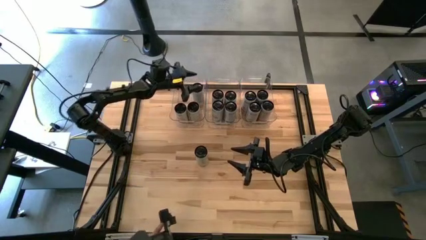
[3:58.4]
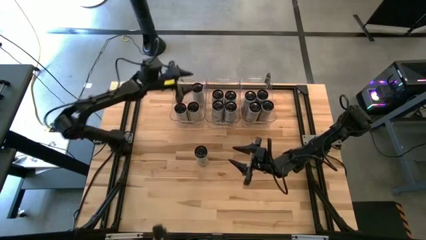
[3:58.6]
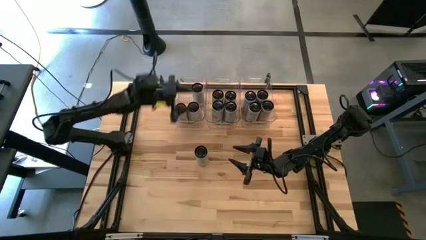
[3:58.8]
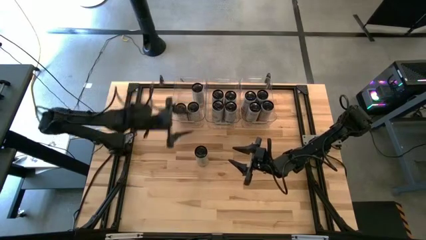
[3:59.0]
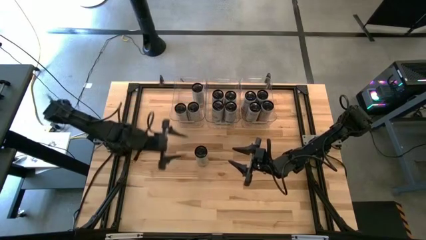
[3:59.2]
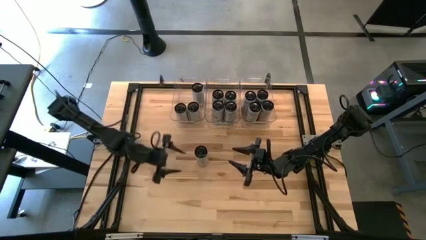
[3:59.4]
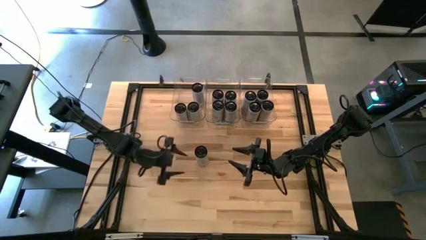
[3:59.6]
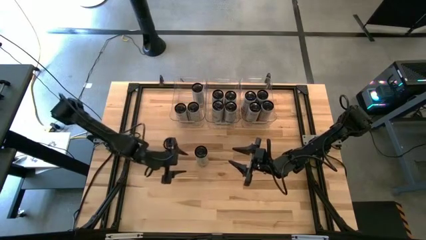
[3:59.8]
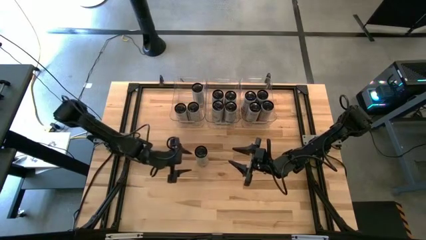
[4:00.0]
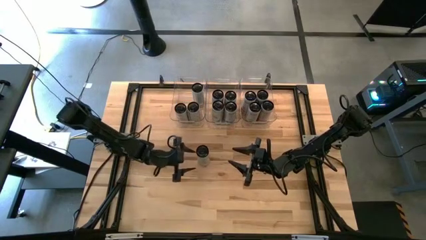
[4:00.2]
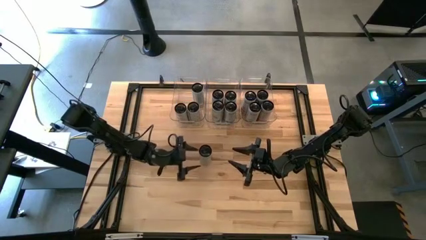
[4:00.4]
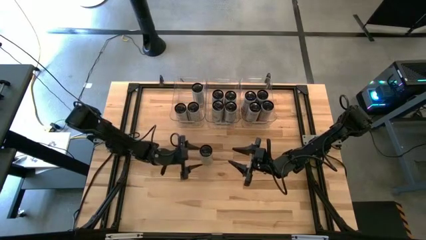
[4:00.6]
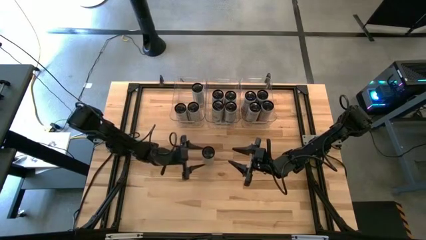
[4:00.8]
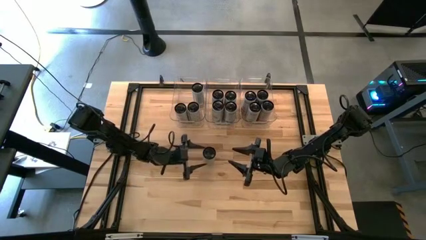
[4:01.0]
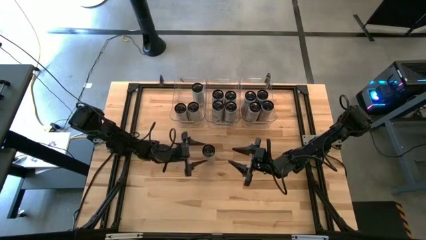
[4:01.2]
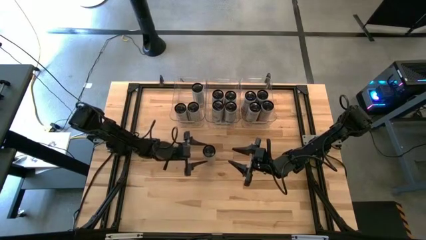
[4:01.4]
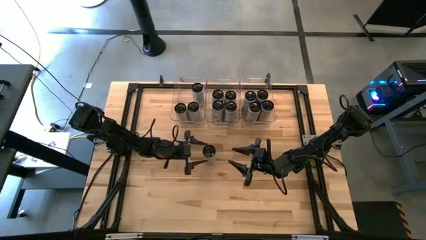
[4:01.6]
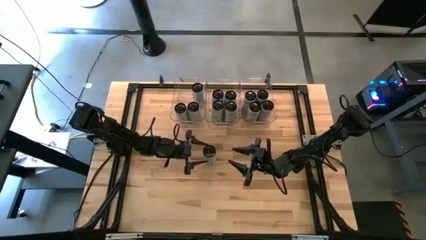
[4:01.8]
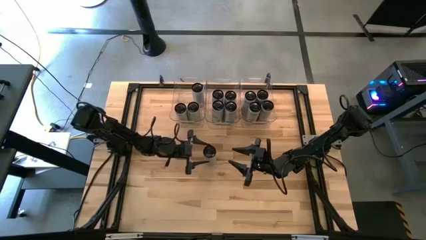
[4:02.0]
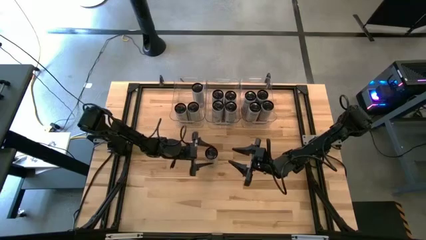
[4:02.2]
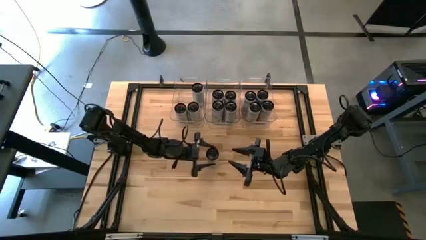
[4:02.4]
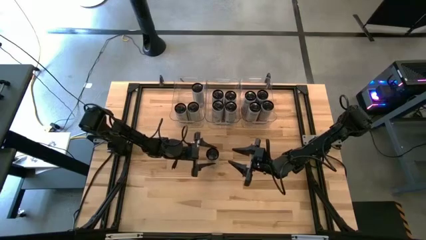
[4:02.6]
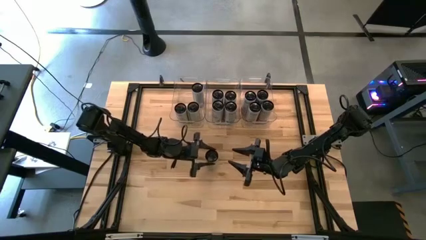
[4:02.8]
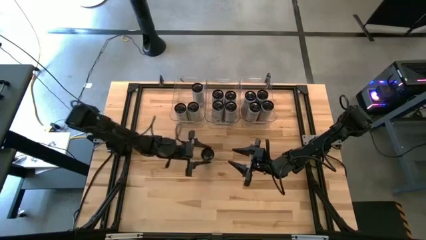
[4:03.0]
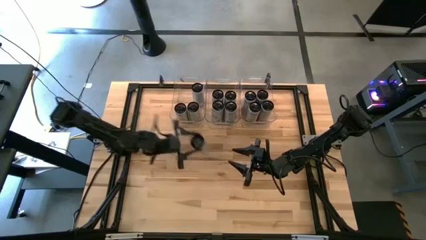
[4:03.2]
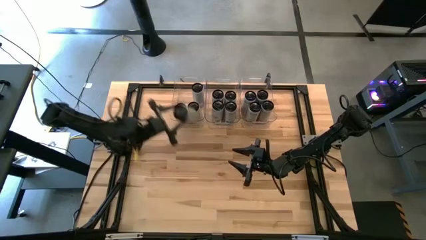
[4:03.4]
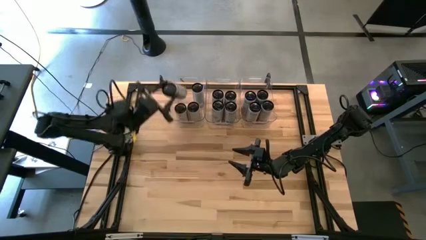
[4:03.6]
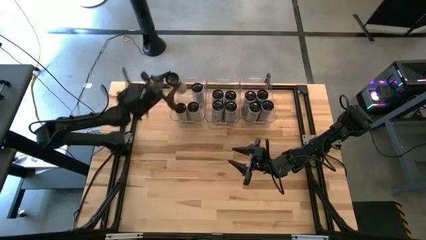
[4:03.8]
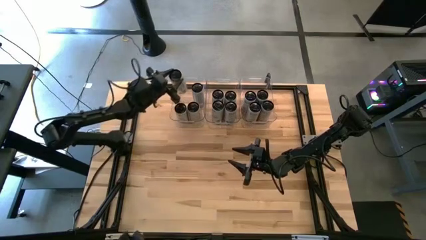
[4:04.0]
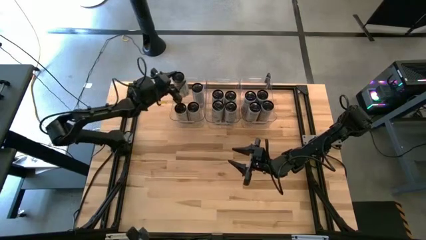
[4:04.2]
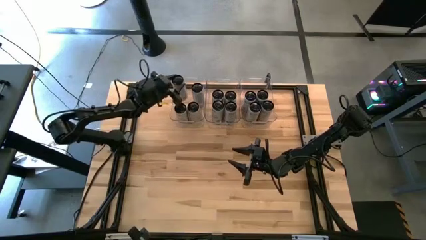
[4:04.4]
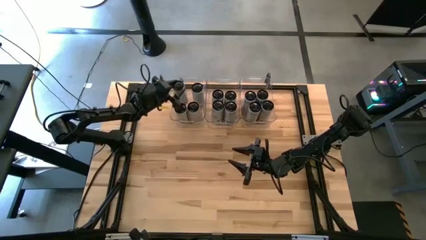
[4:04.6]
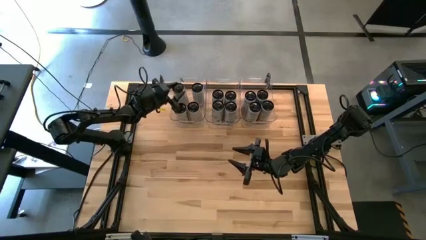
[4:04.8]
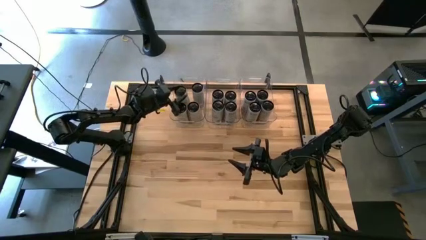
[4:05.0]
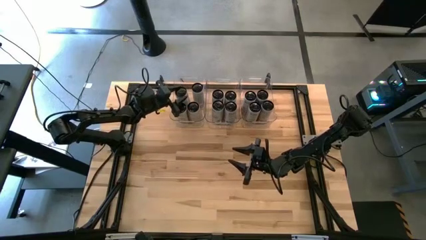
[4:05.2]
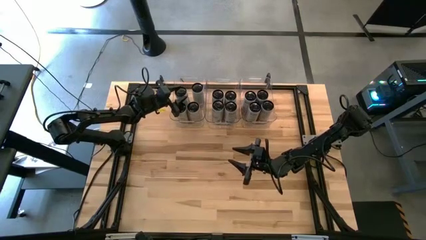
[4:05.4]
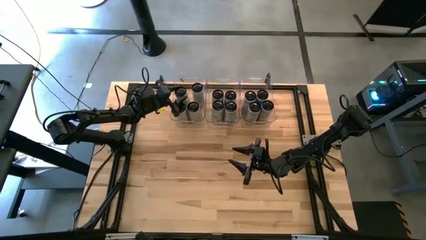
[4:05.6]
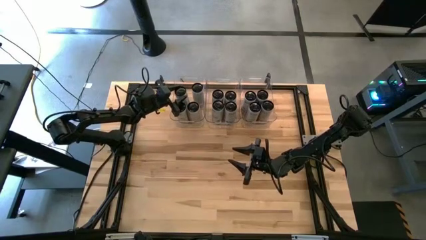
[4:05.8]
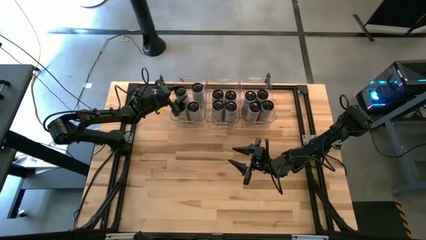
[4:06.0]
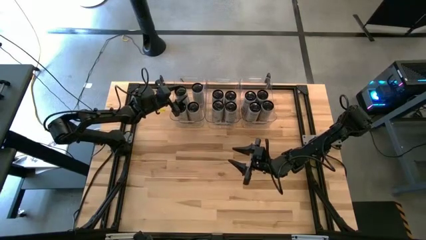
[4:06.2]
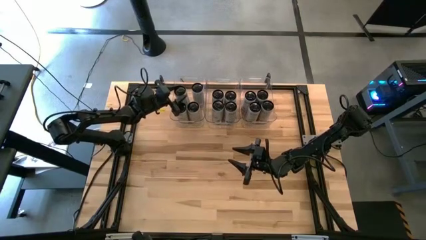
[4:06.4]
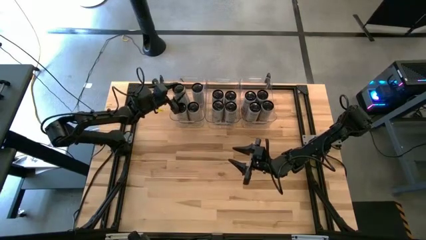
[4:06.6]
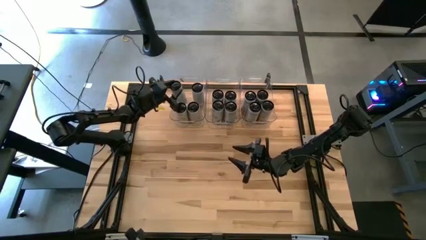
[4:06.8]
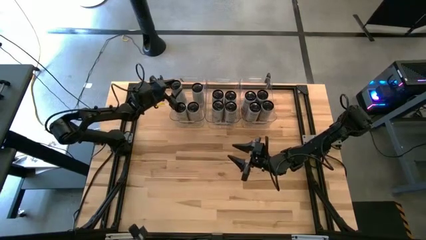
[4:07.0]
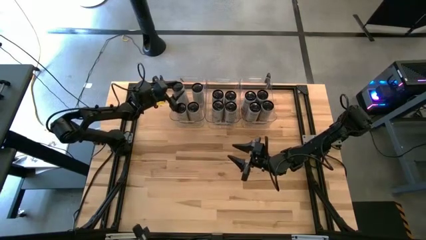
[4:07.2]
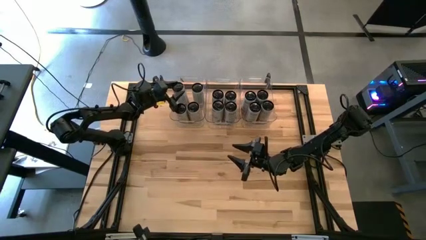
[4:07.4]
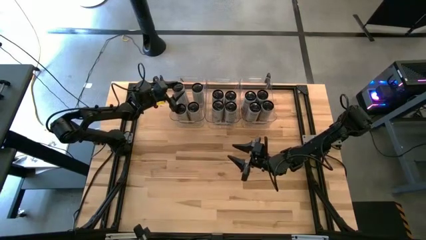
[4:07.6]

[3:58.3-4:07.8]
Task: Sort soda cans
Put the white-yellow soda can into the top left transparent bin

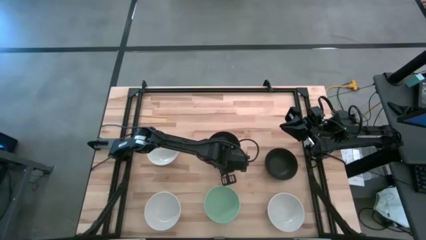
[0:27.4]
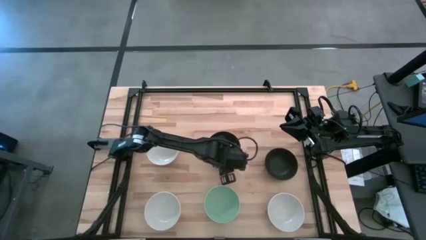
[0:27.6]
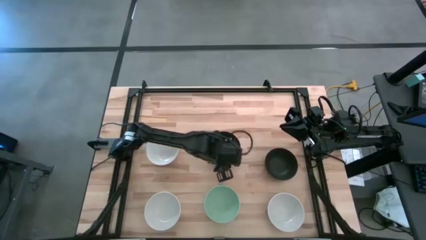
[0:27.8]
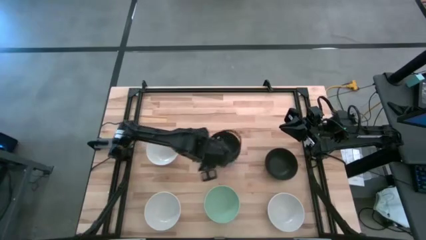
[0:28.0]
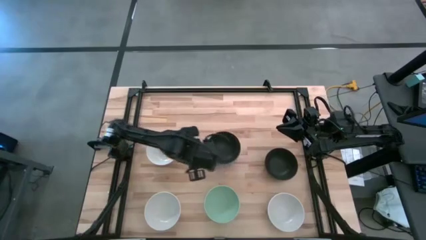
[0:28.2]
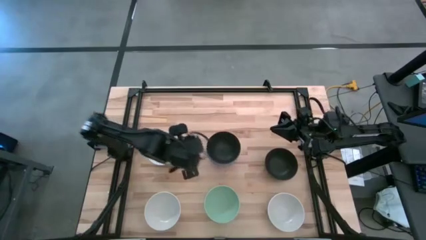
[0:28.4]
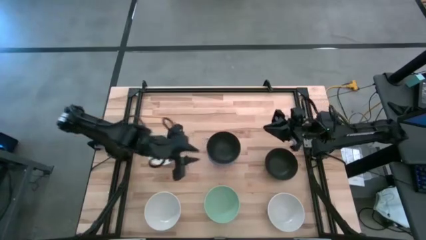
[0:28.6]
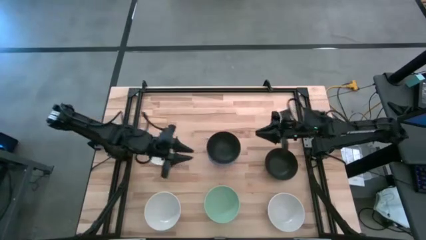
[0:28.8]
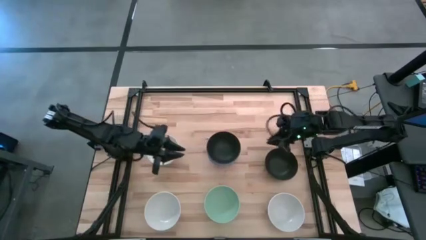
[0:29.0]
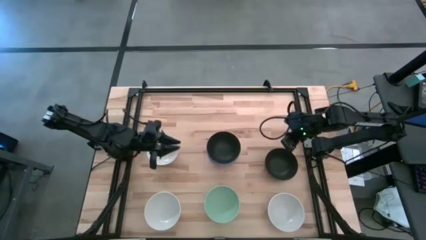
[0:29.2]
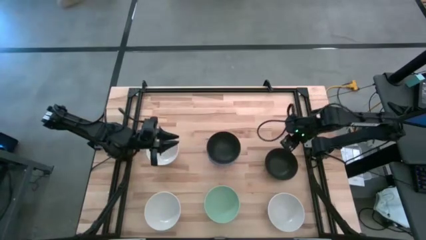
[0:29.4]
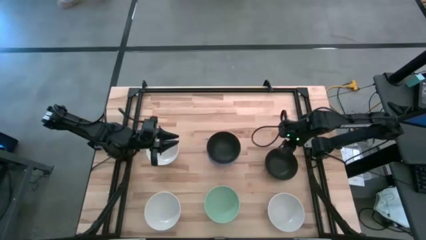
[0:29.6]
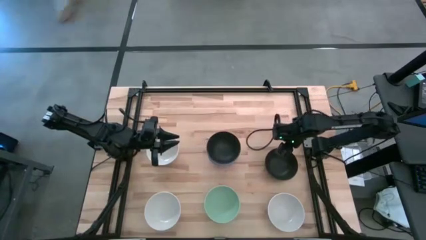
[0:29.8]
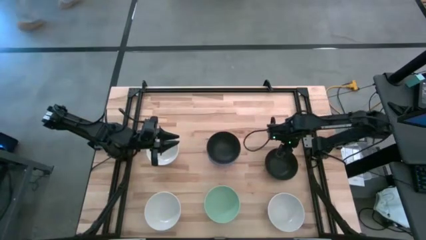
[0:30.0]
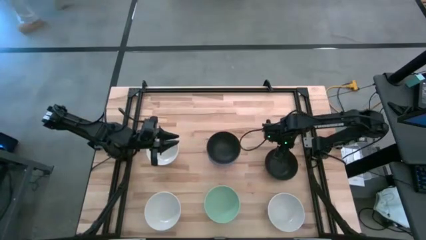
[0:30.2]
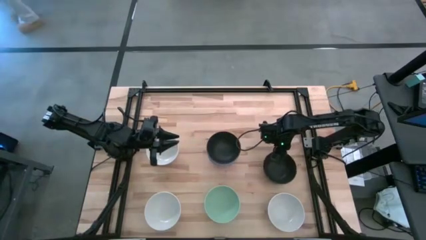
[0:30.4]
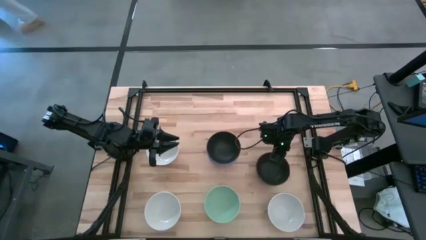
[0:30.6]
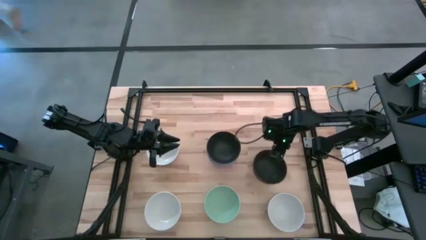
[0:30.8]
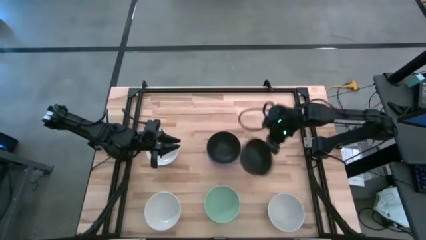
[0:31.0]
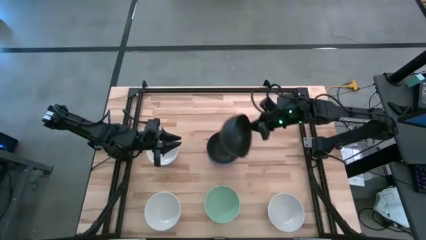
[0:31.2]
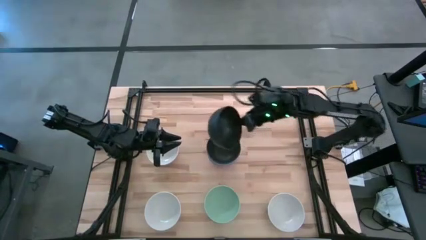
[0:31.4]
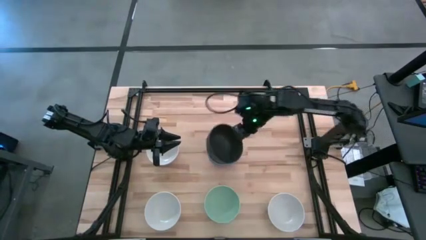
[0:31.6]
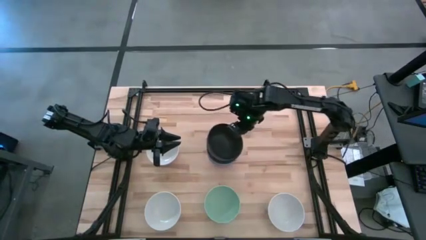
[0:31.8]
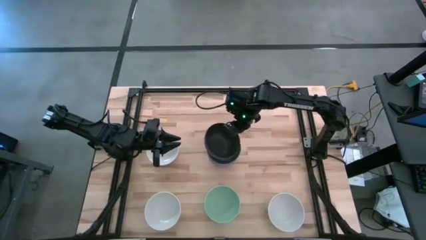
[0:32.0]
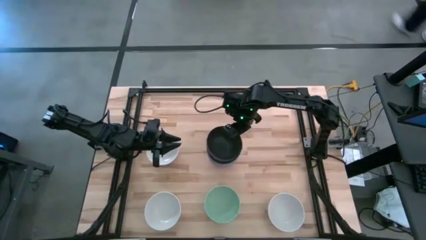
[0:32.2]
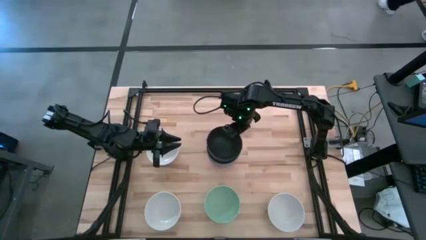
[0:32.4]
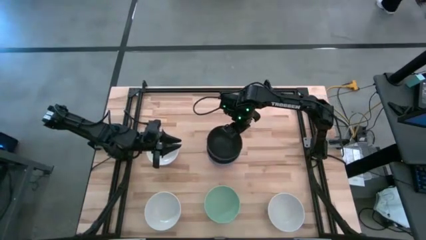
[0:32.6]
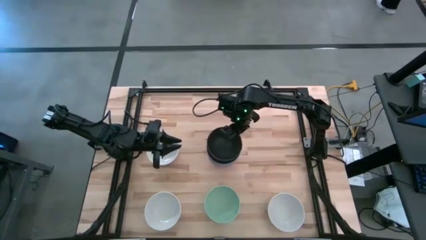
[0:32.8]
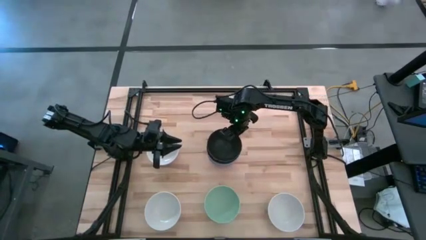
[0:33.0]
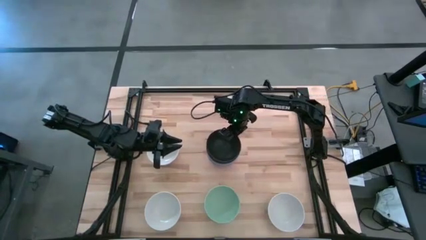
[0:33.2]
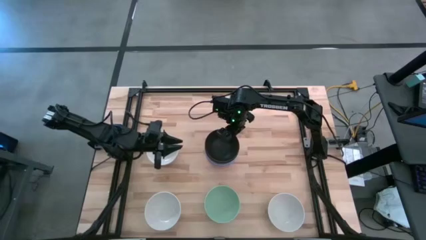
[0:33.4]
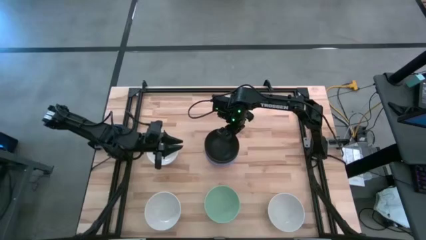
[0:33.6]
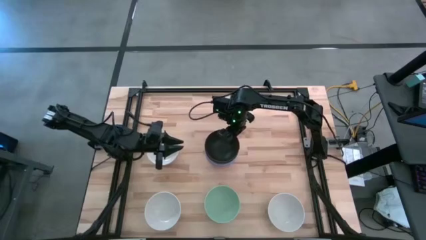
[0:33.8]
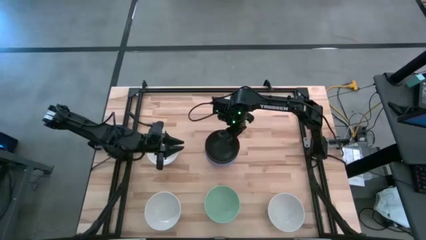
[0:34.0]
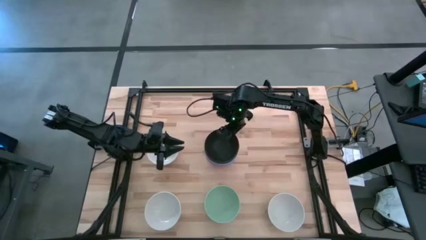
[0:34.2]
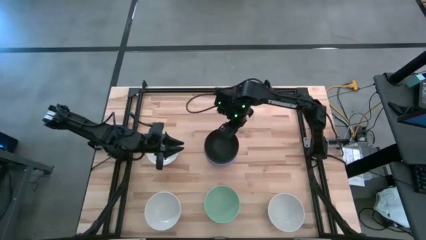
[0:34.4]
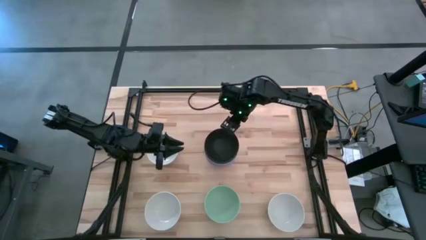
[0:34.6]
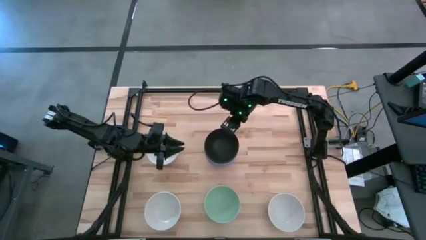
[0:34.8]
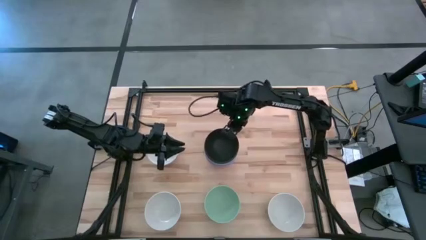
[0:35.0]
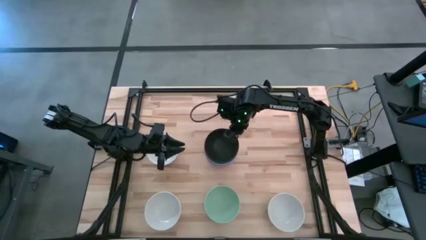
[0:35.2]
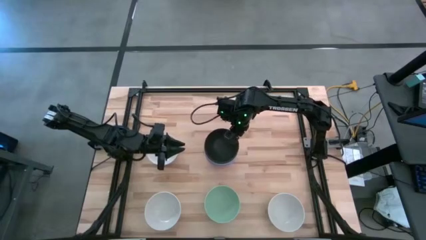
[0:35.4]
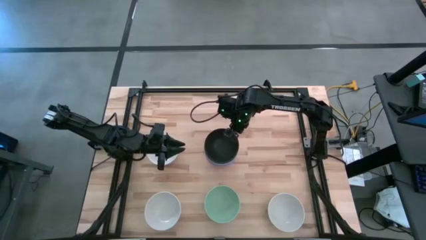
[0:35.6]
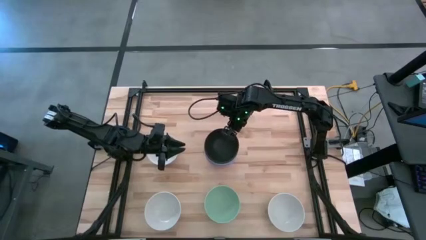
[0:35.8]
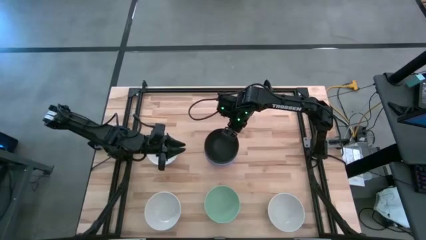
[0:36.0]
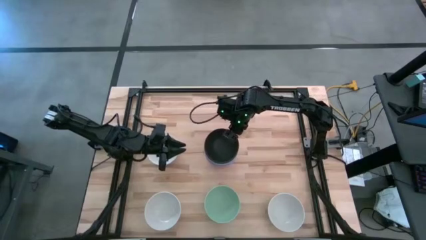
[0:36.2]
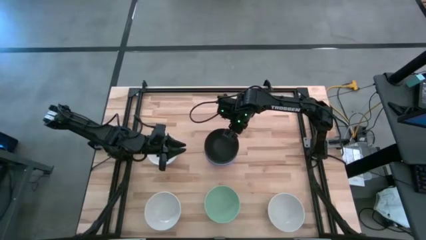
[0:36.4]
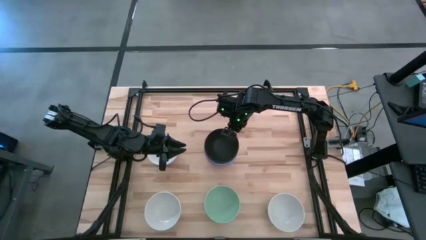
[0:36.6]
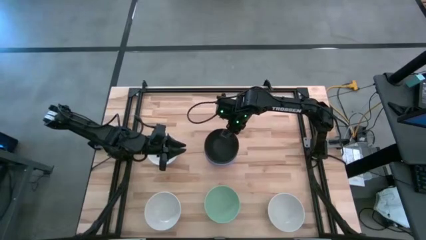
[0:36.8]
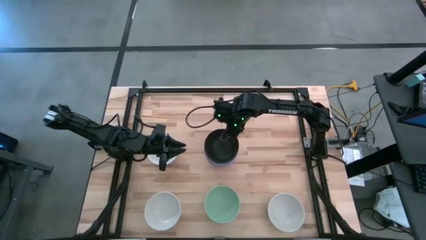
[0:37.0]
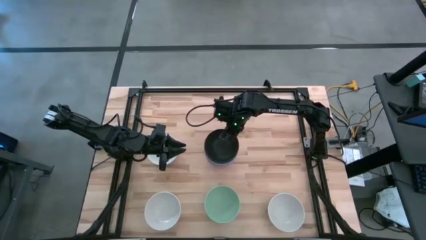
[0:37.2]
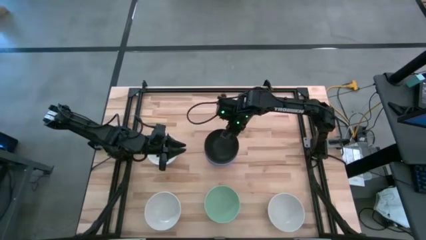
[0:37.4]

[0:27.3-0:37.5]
Task: Nest bowls inside each other
Stack the black bowl into the black bowl
